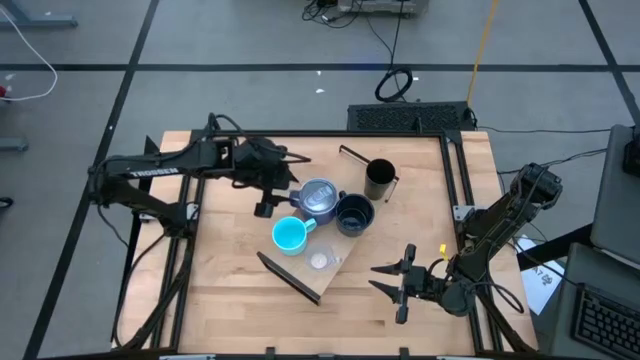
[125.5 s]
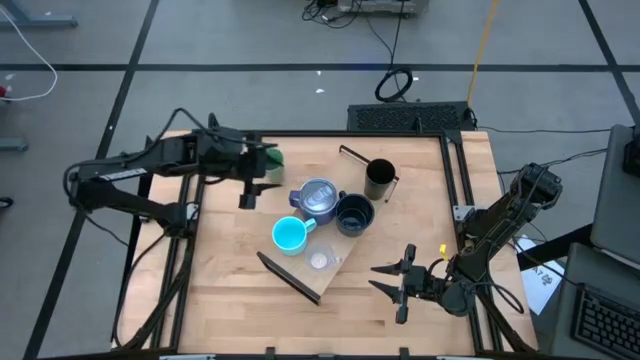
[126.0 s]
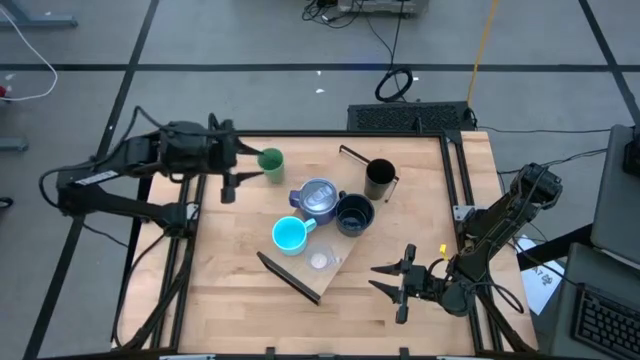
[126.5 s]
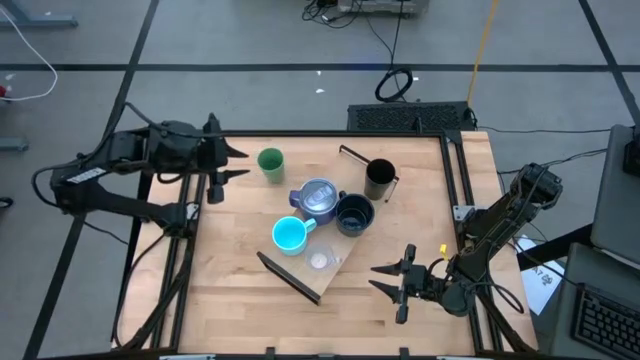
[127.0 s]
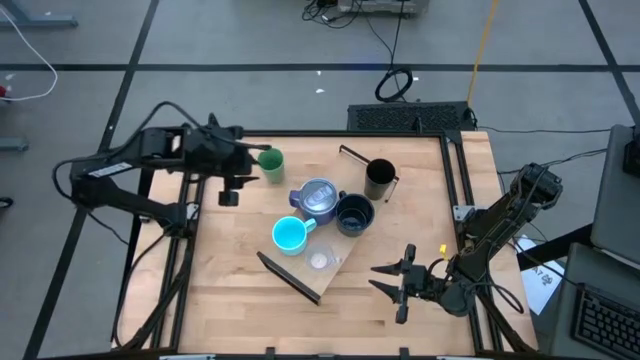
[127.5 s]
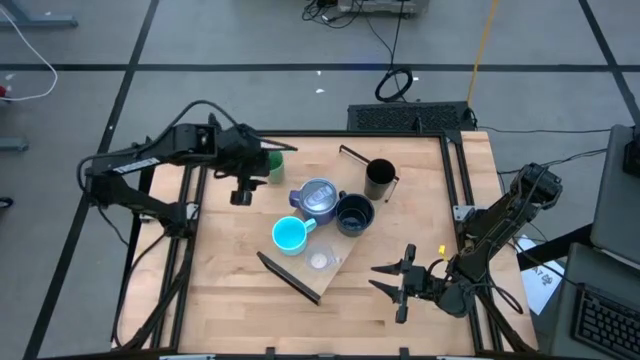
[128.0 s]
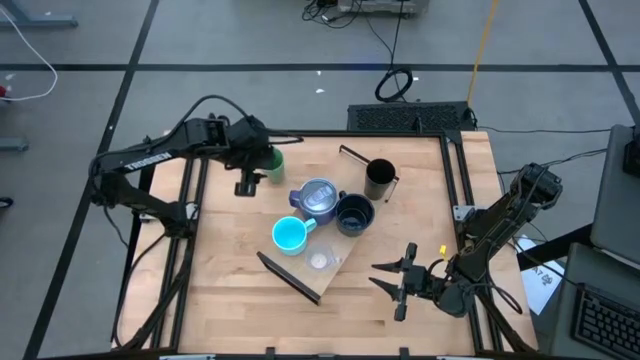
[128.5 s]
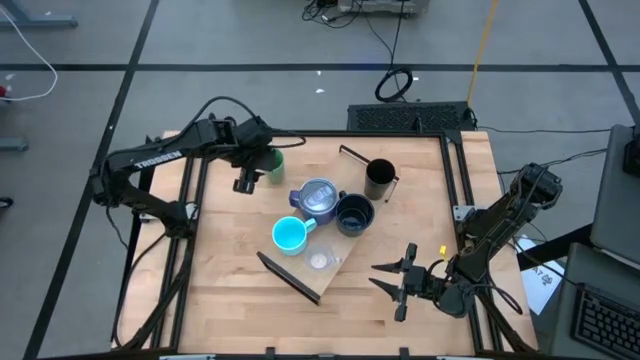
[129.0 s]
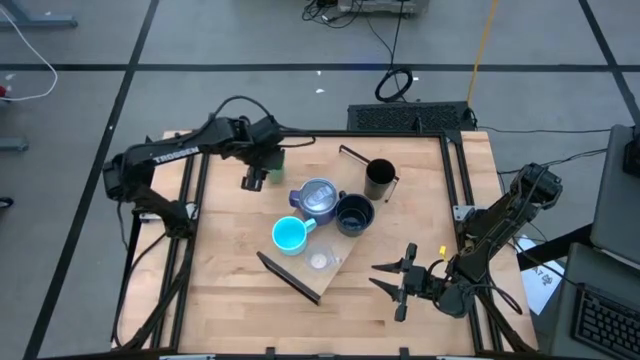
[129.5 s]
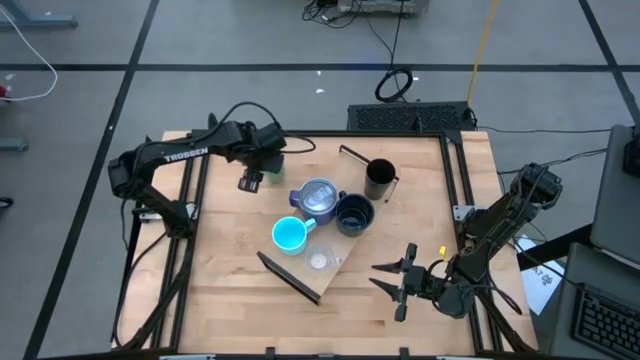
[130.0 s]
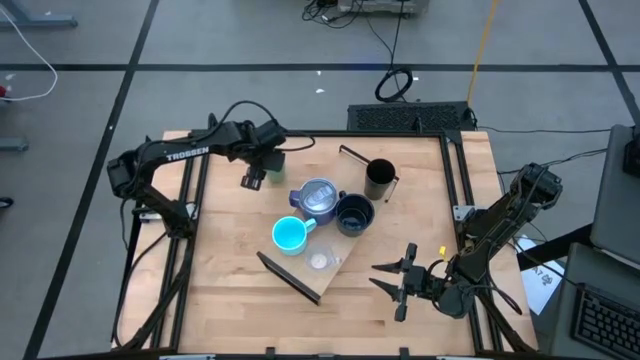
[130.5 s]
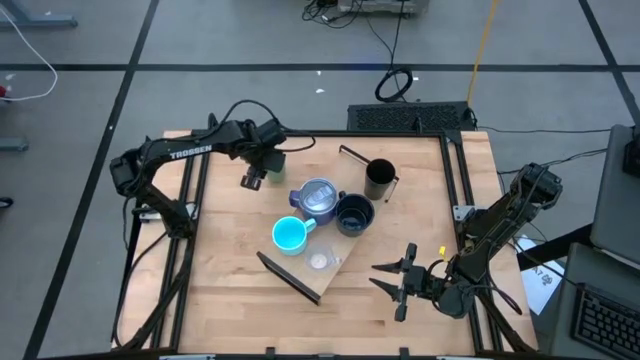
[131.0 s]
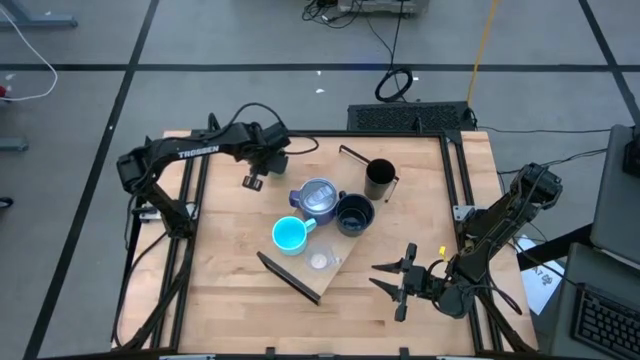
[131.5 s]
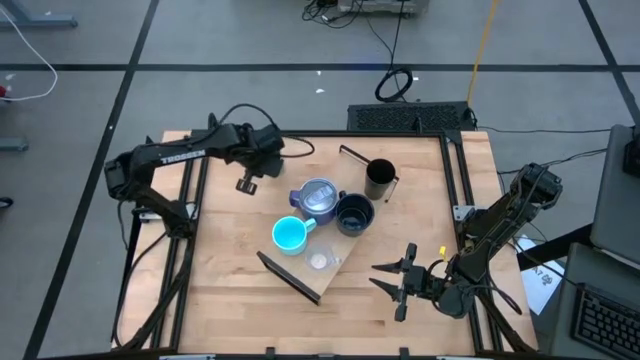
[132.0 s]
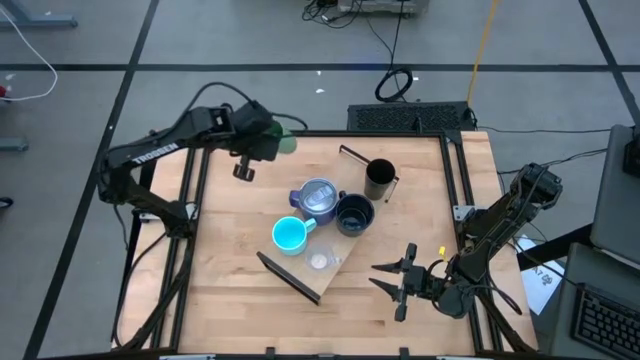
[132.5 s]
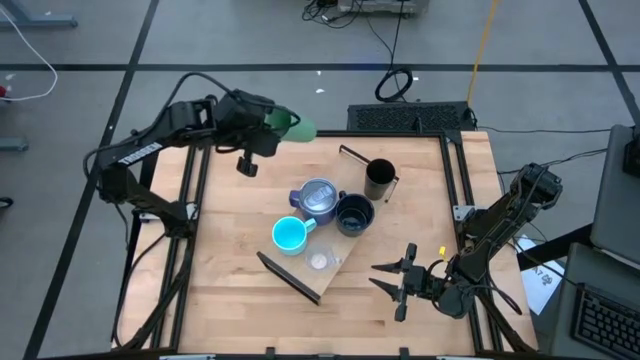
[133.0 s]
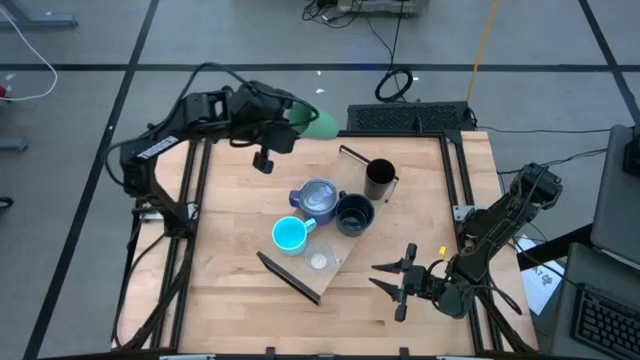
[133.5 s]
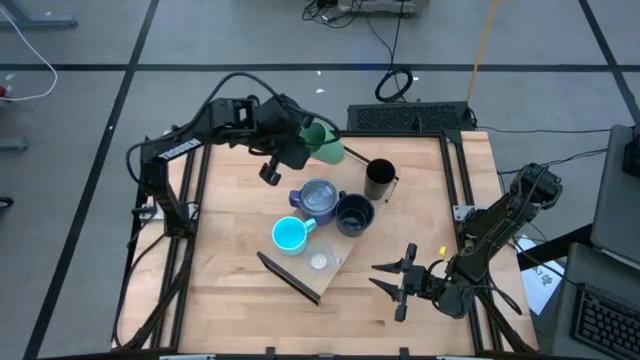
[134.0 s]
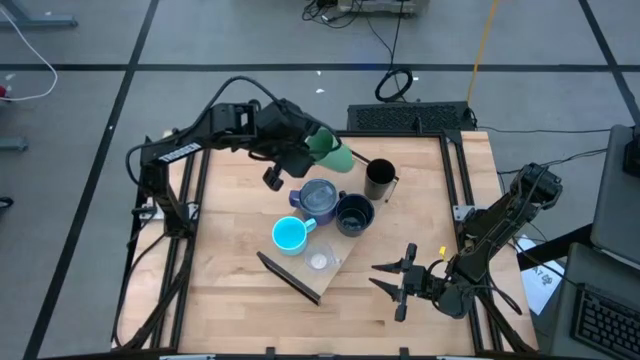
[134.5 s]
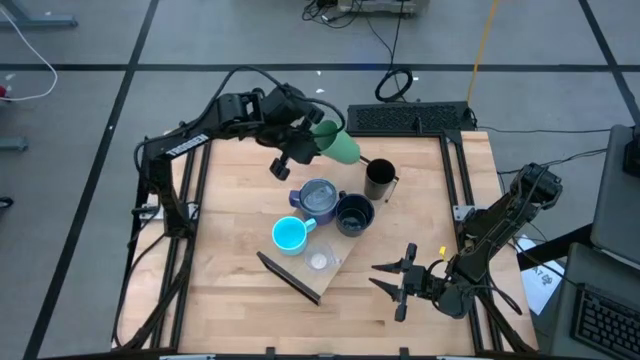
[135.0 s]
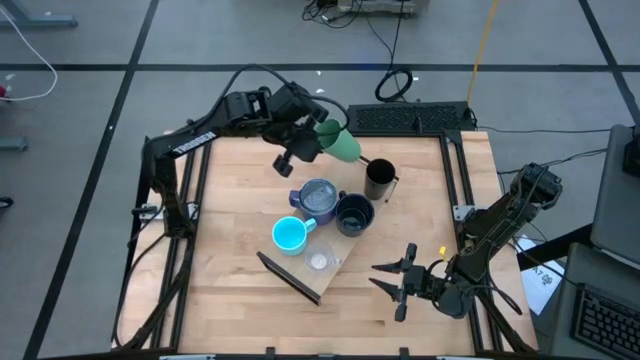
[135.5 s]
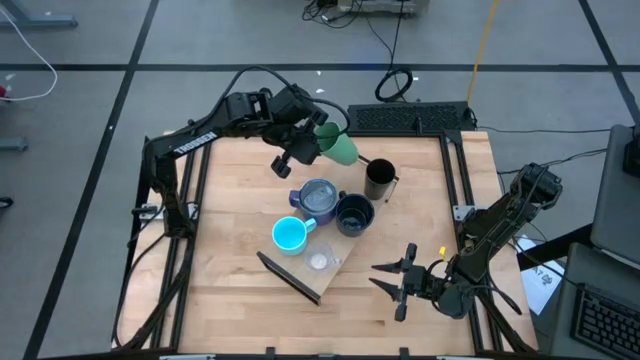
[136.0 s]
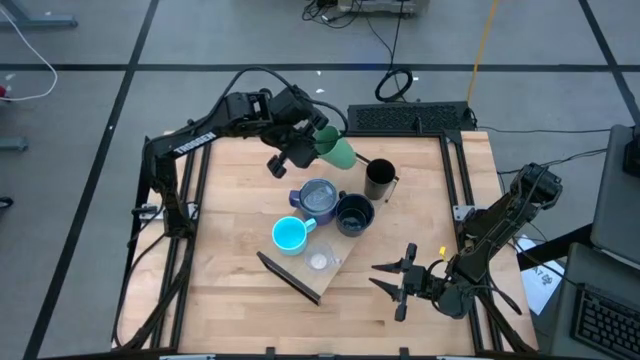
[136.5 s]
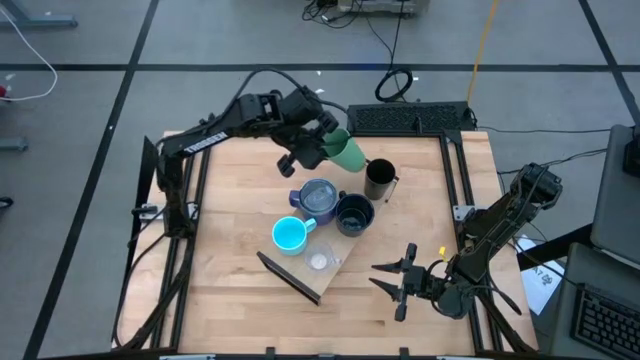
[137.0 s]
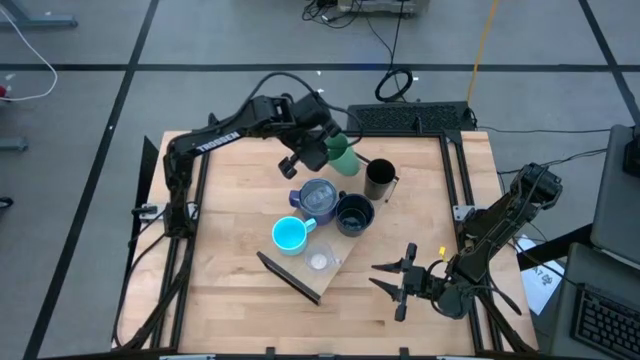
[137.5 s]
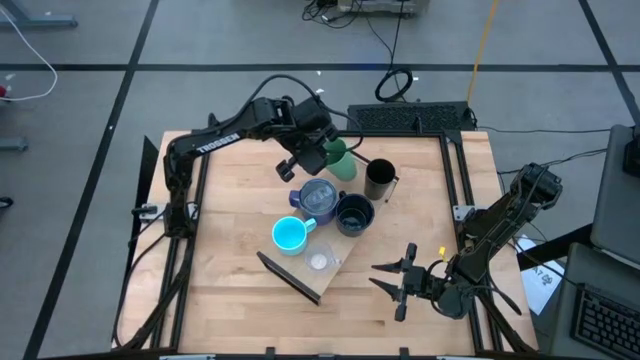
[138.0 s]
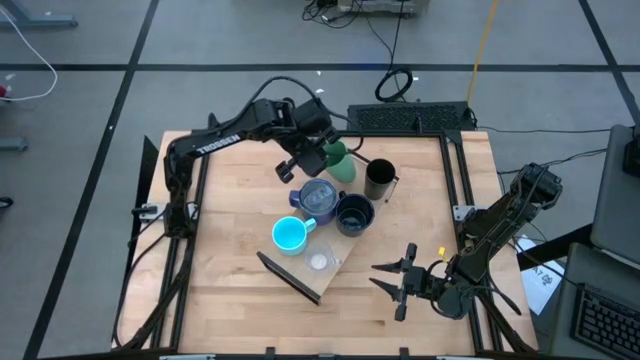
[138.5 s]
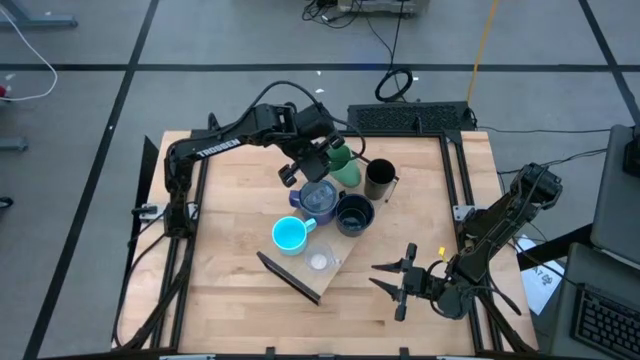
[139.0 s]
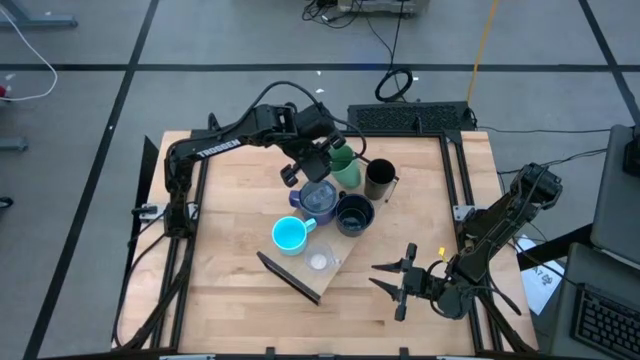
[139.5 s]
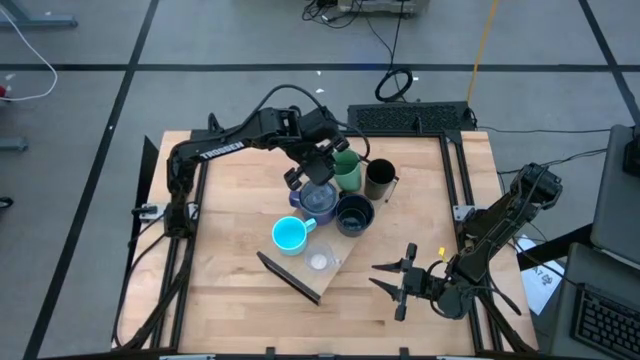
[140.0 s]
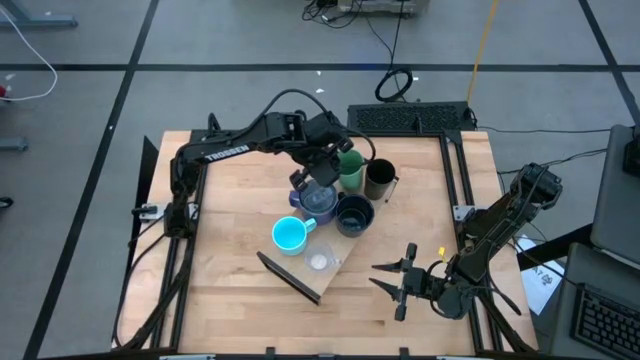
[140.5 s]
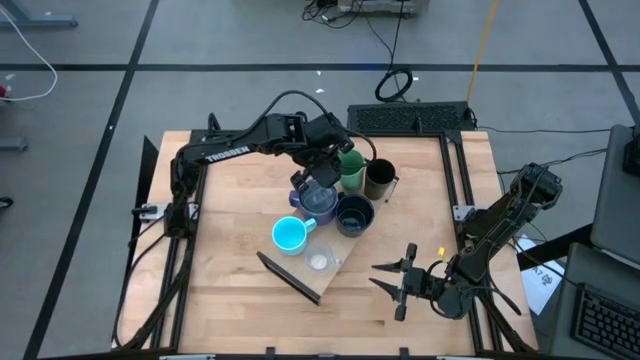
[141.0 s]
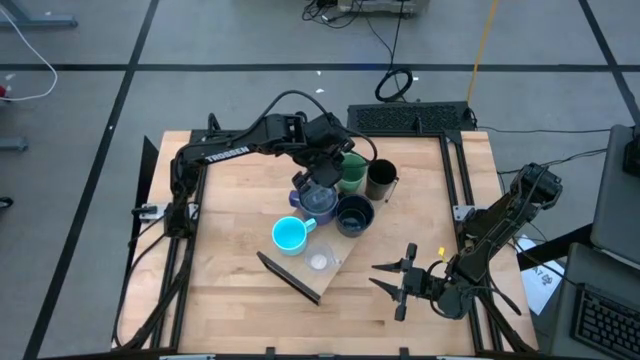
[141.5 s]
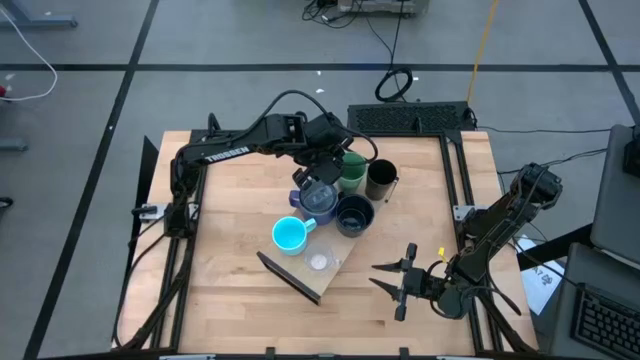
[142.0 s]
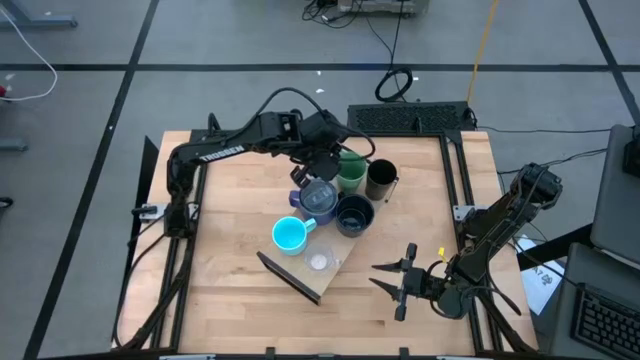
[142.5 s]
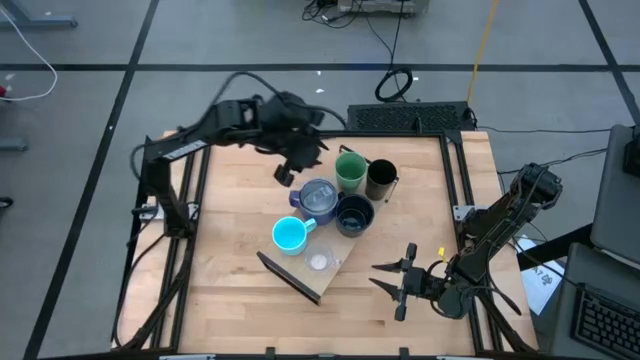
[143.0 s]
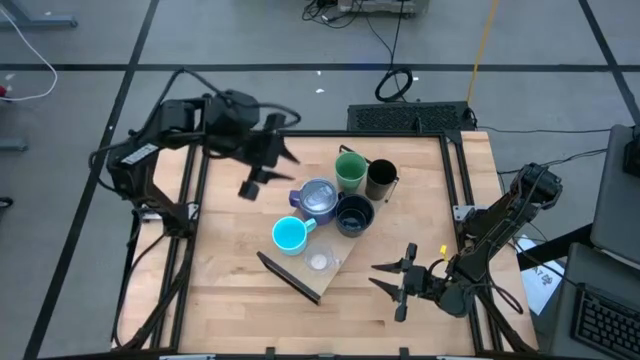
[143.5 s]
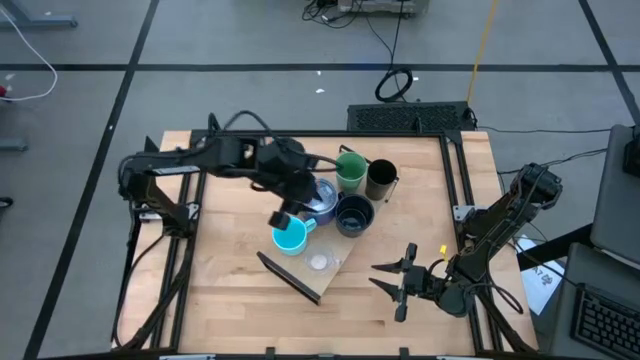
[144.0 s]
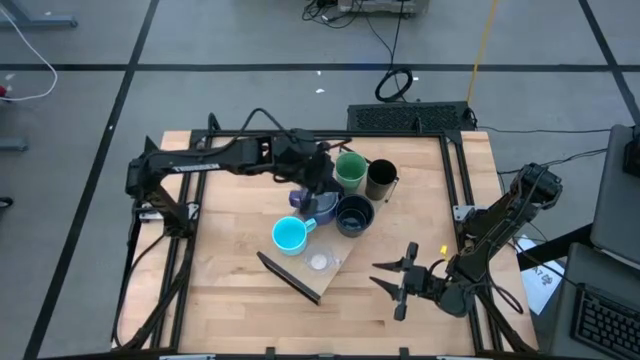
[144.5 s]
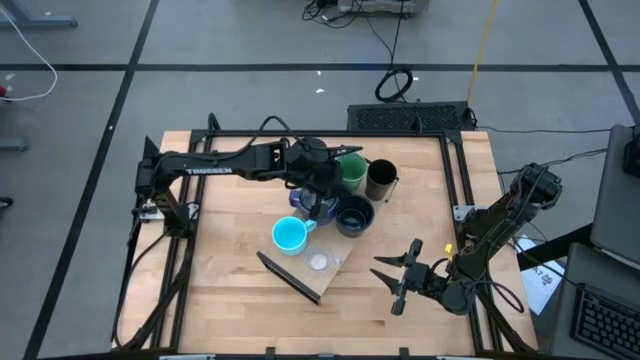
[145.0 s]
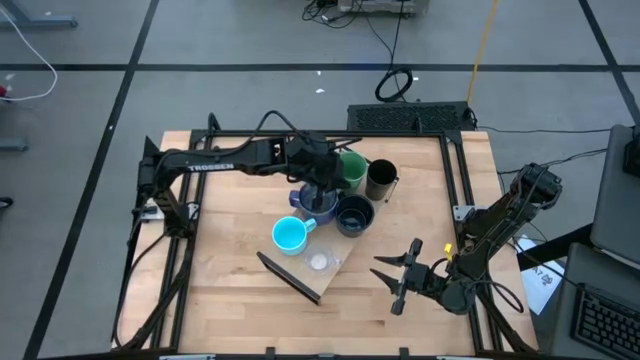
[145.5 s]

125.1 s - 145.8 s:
Task: Stack small to large cups/mugs on shelf
Put the green cup on the shelf aligned with the black cup
